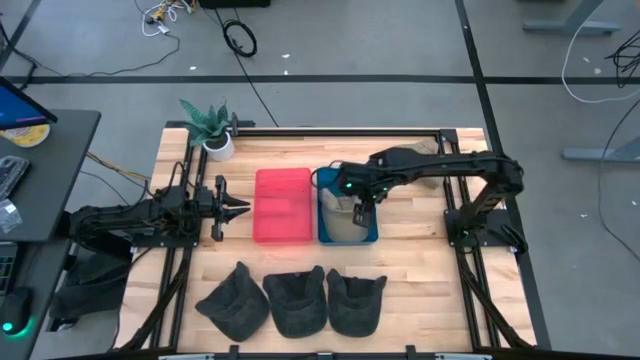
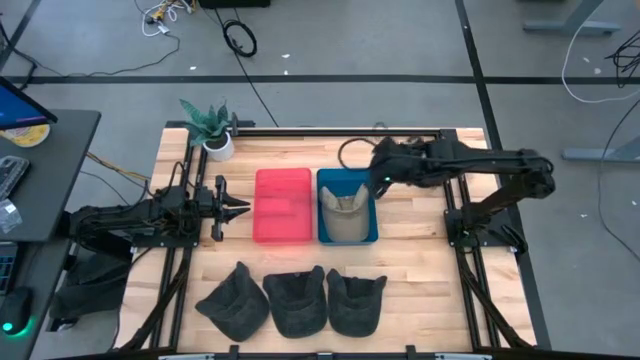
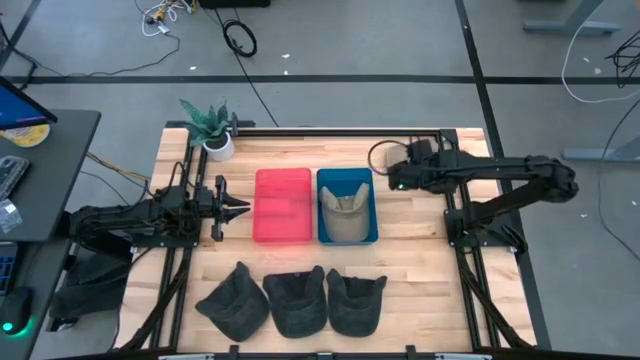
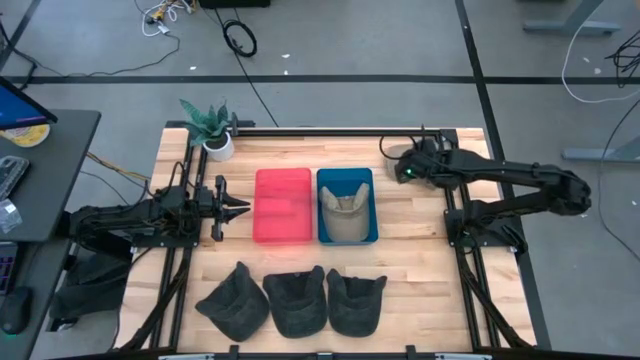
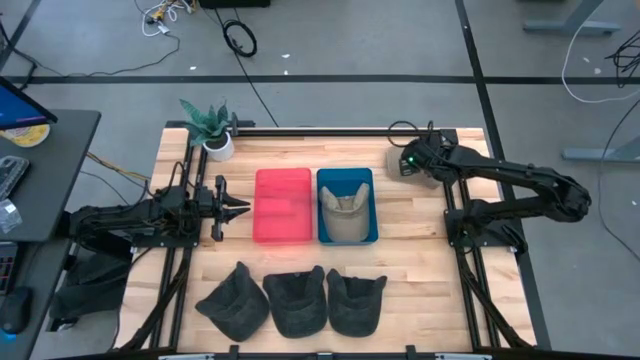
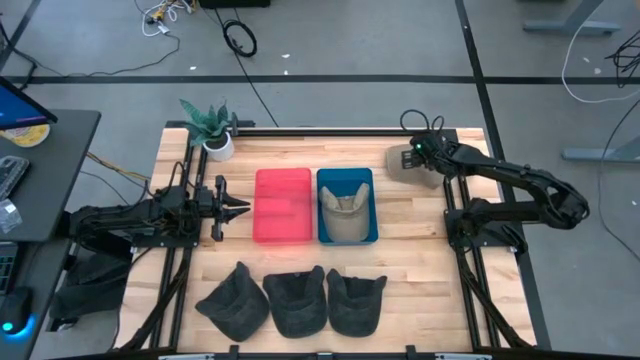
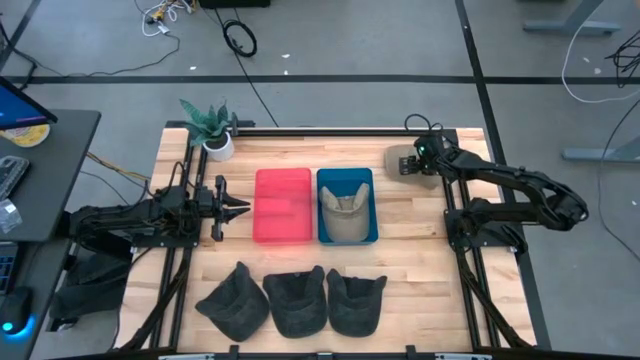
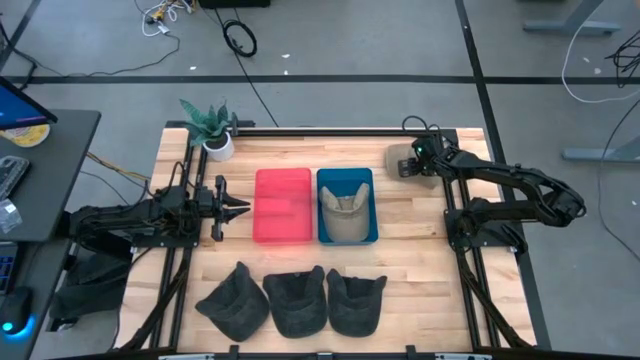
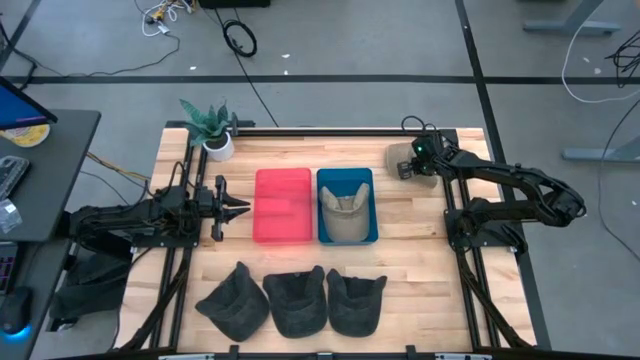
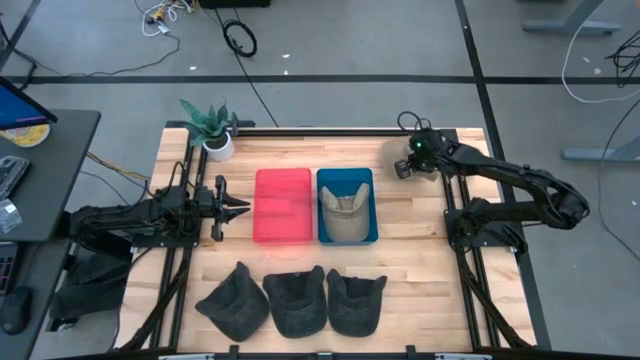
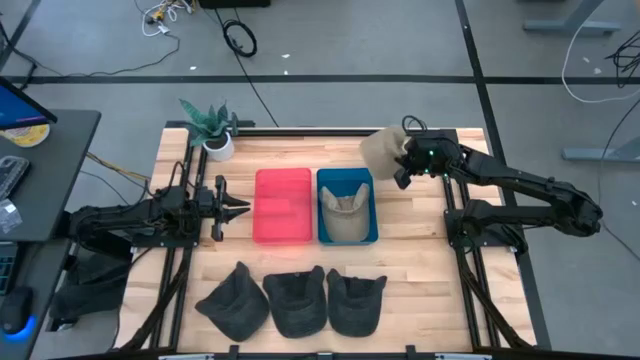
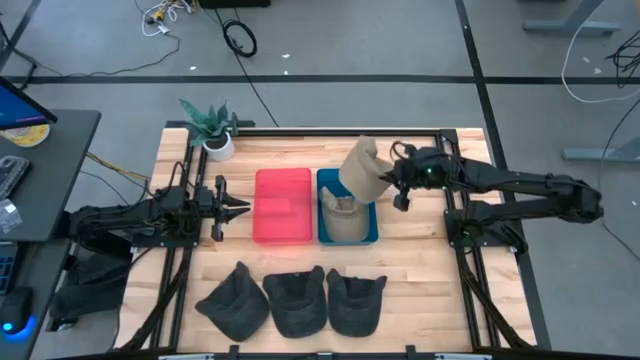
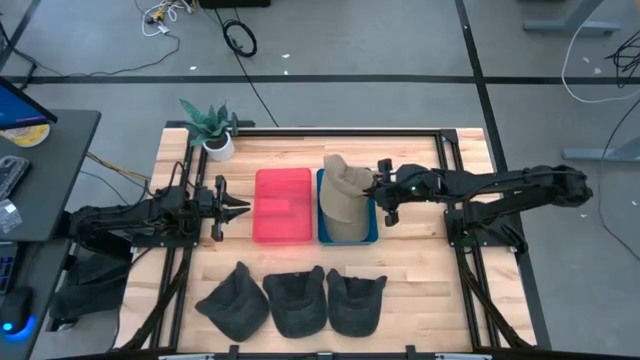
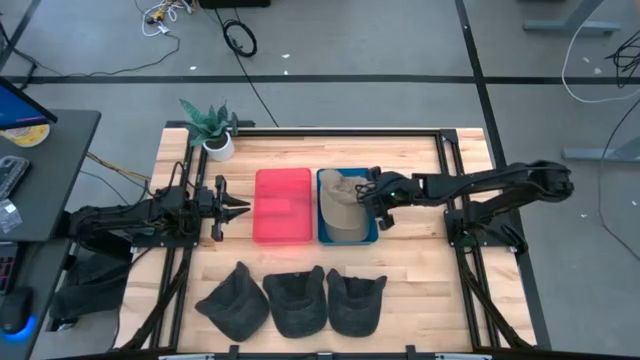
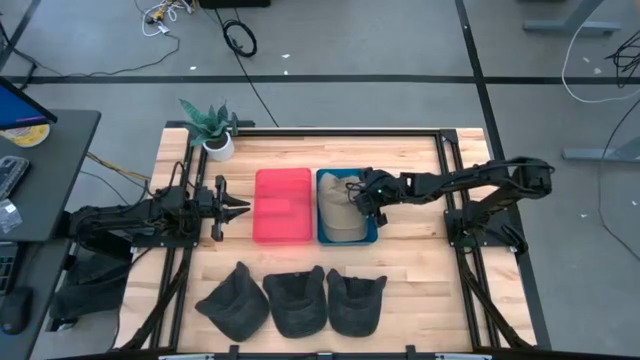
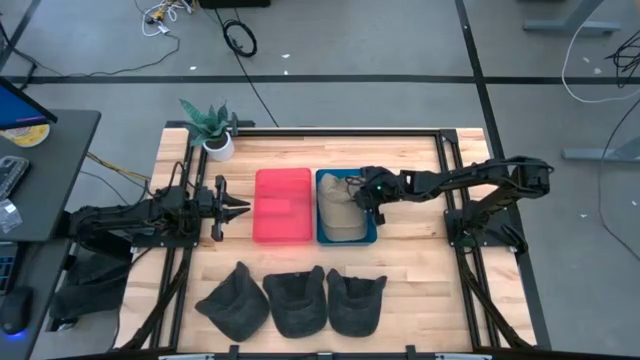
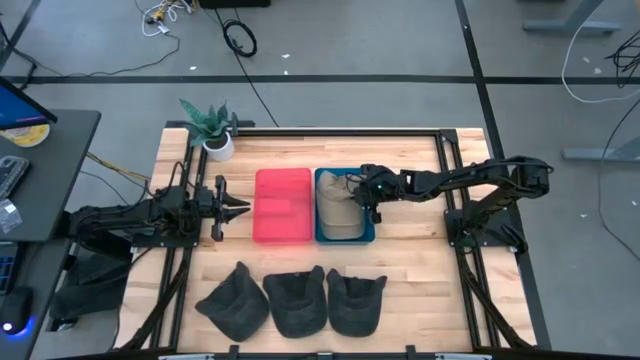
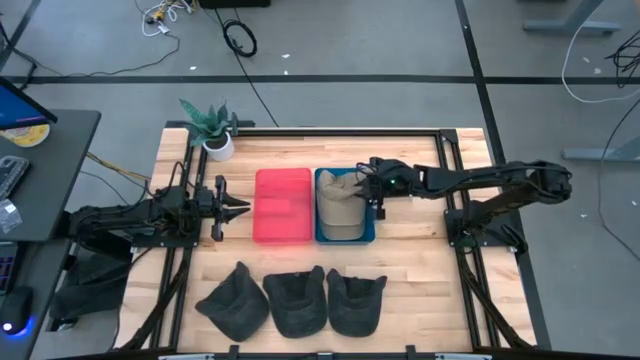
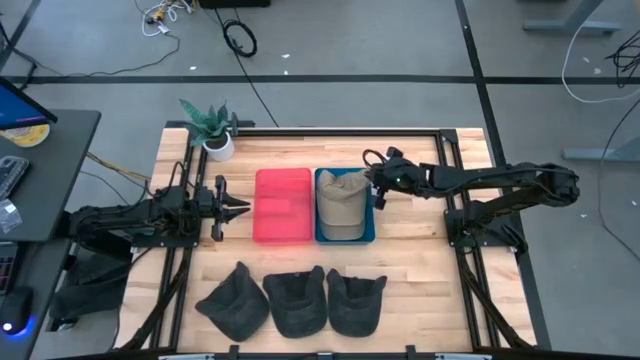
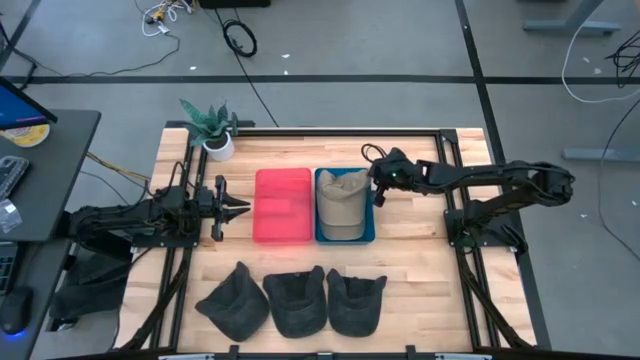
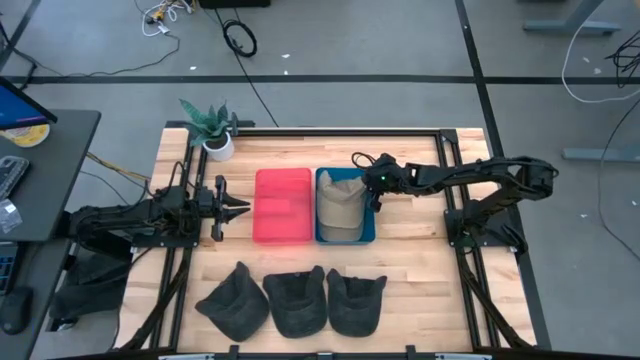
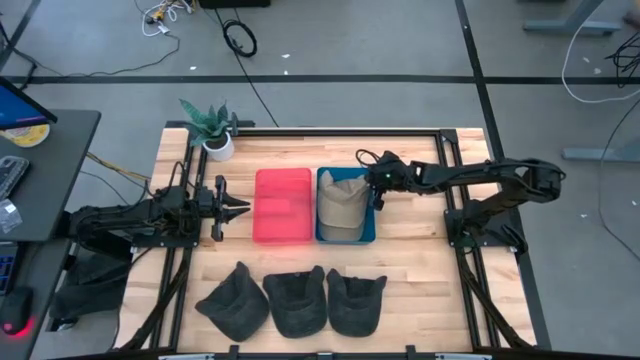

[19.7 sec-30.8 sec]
Task: Pick & Place hat
Put the brown cap into the blue bin

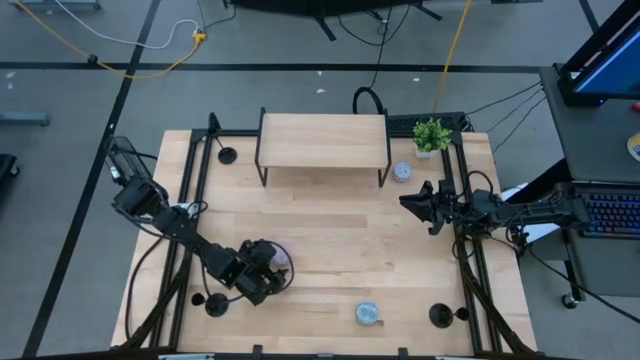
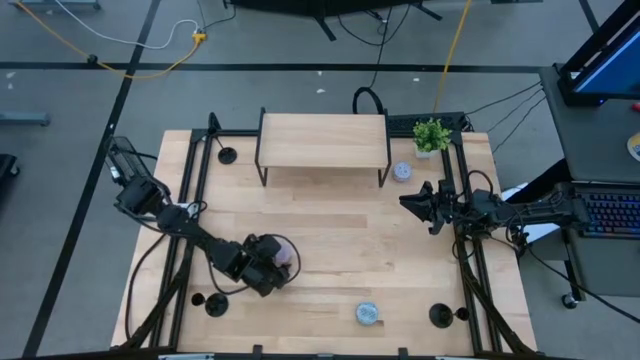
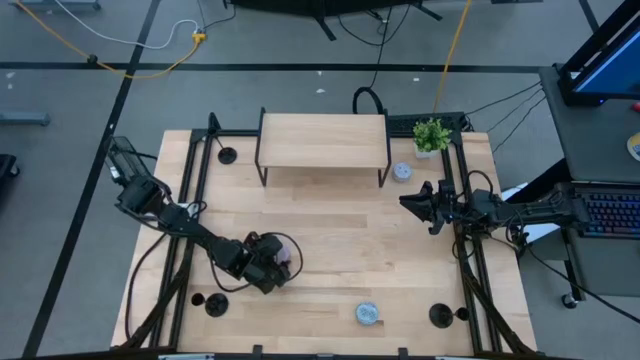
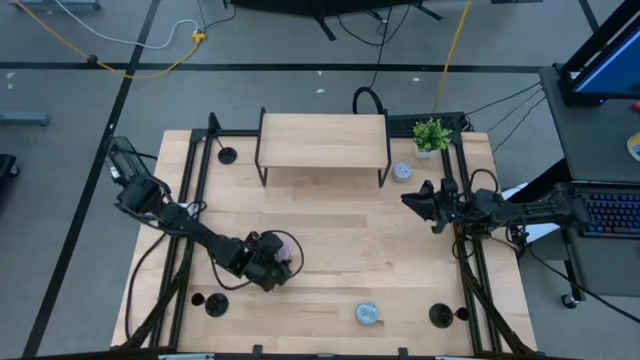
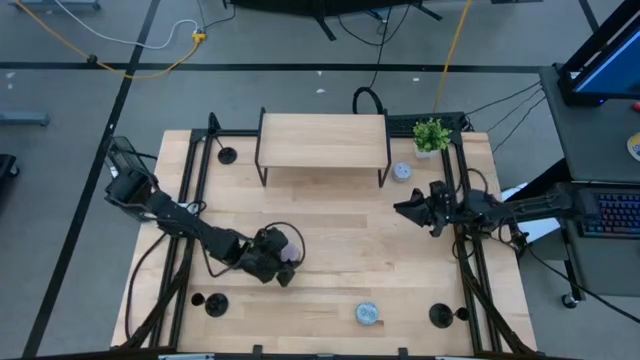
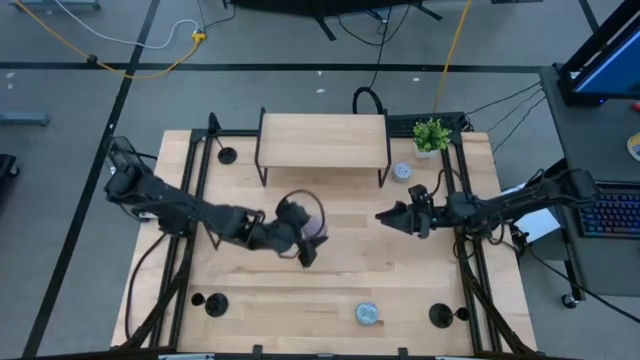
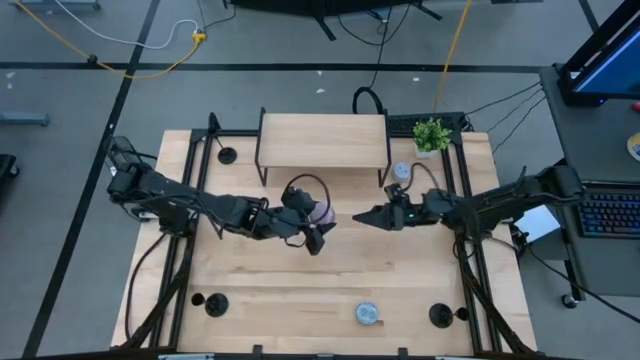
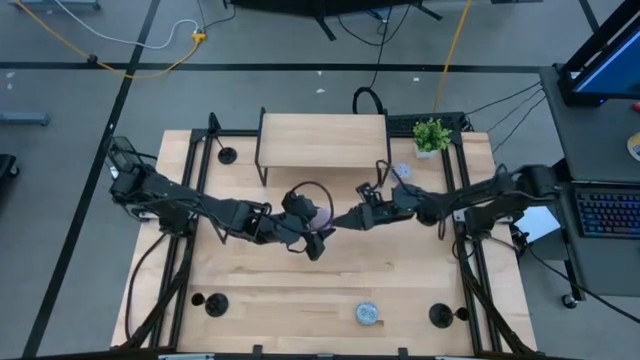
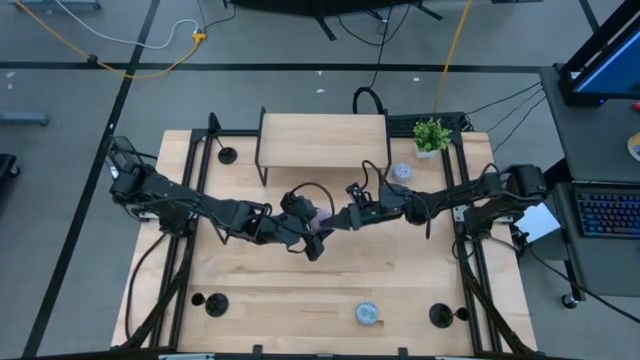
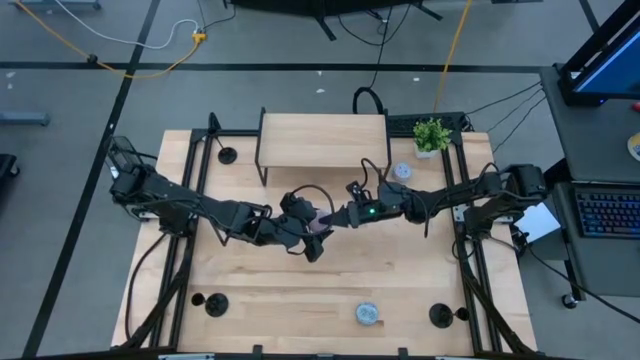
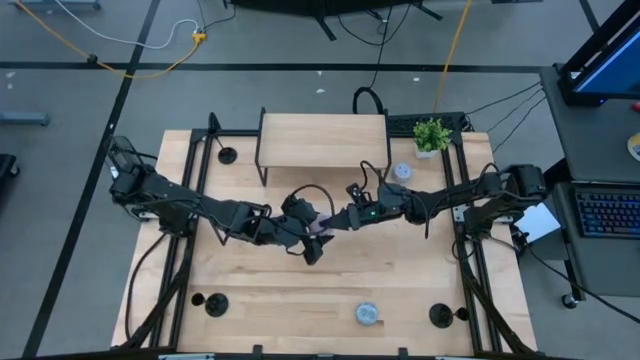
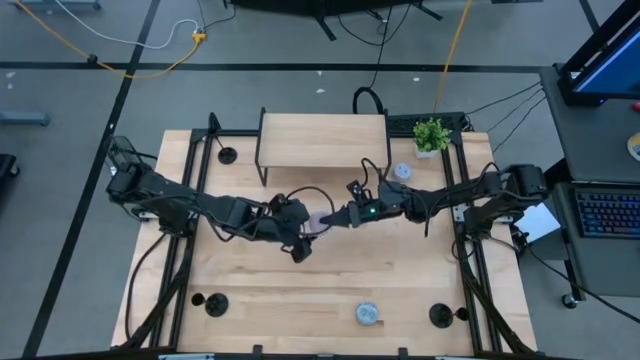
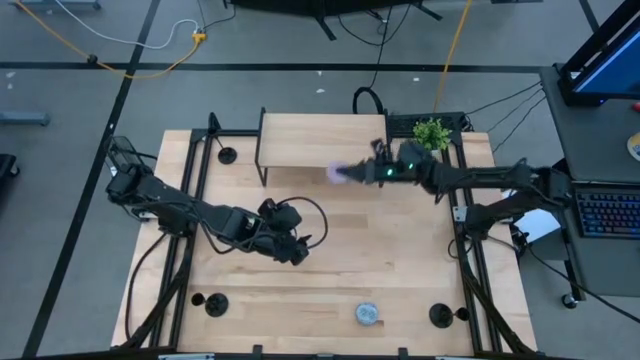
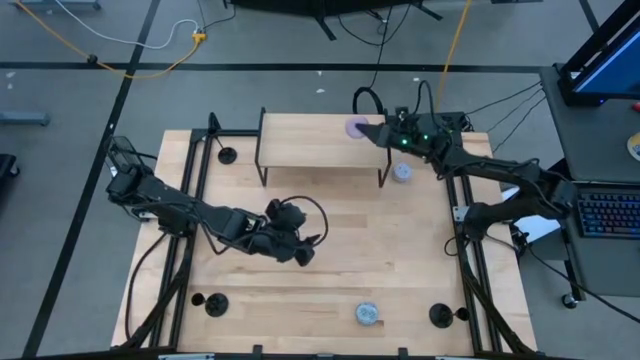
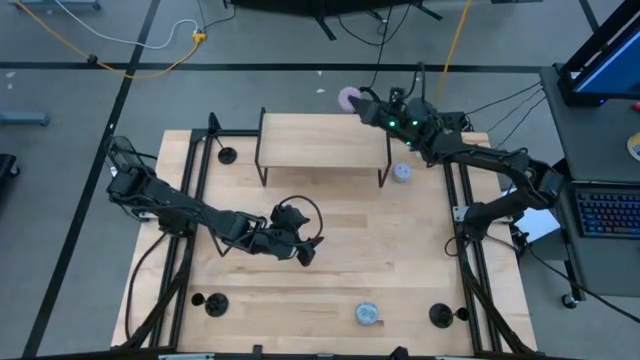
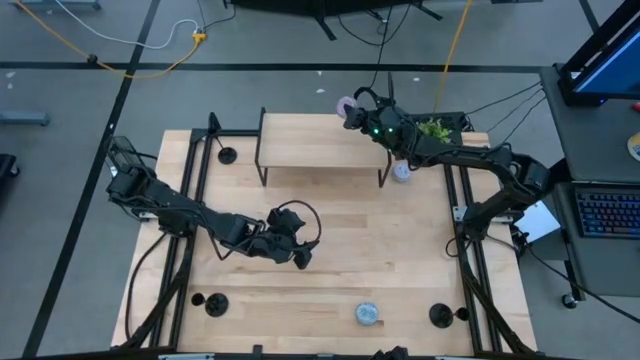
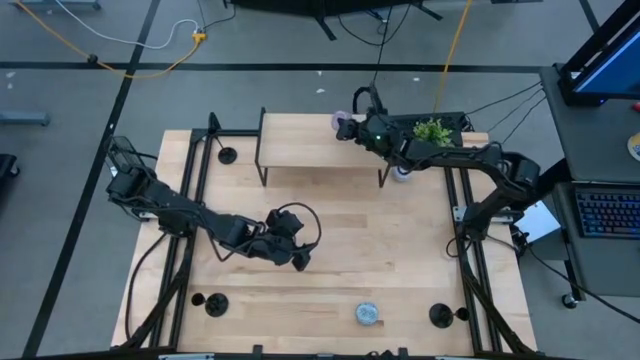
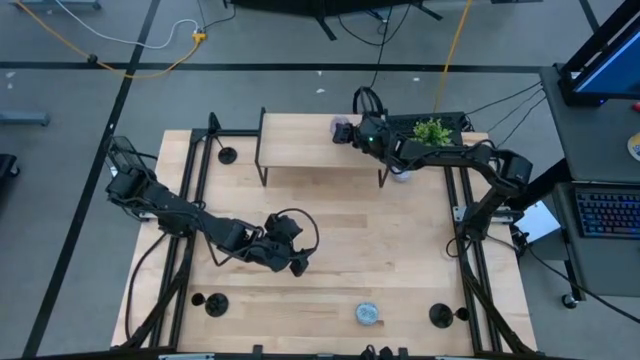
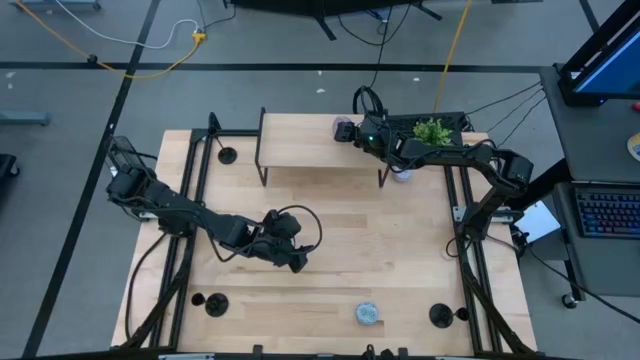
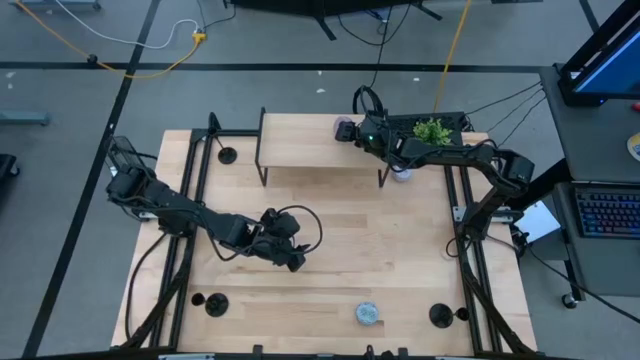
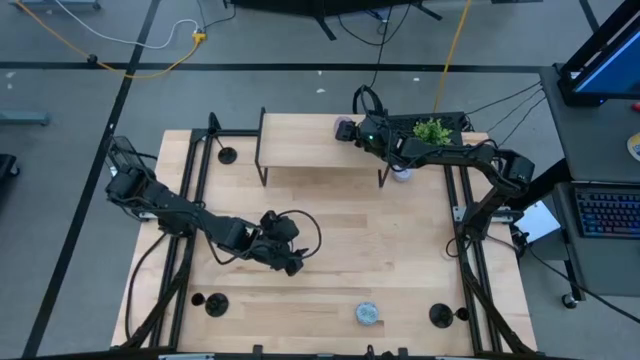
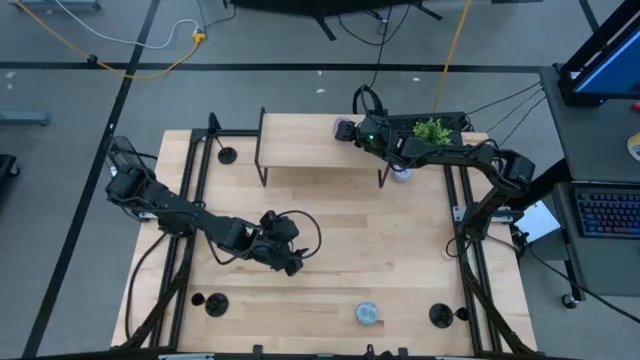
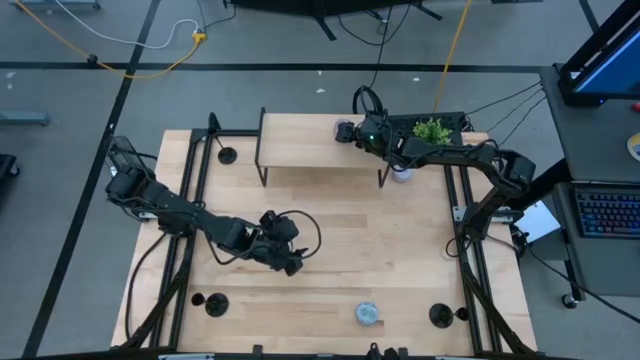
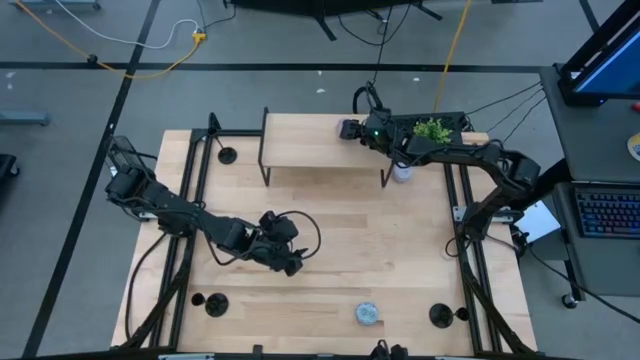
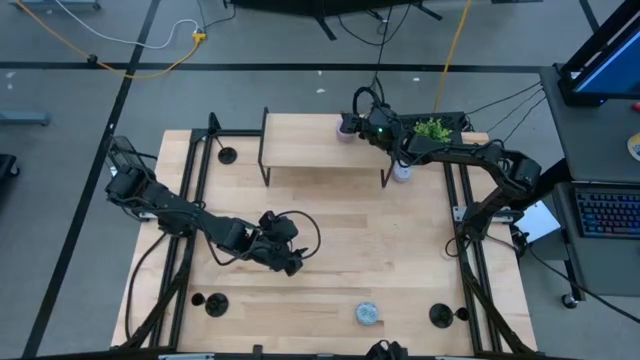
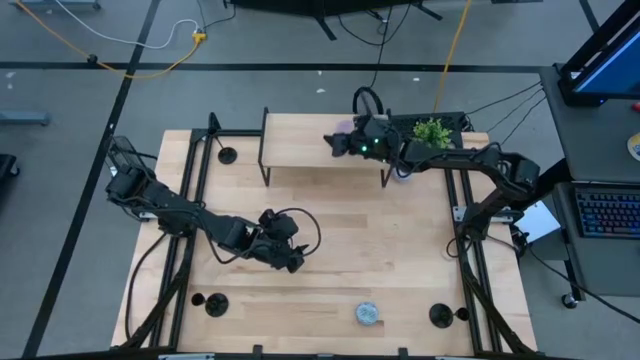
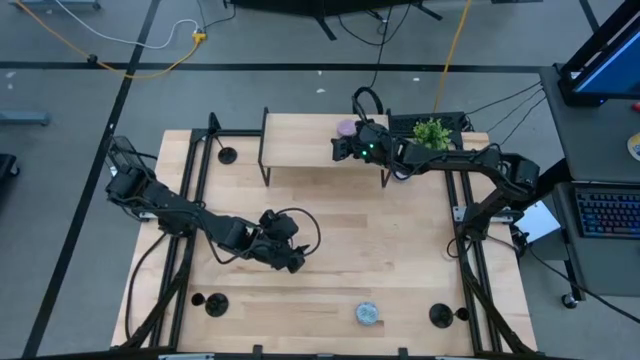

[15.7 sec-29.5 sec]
Task: Pick & Place candle stick holders
Put the pink patterned scented candle on the shelf
